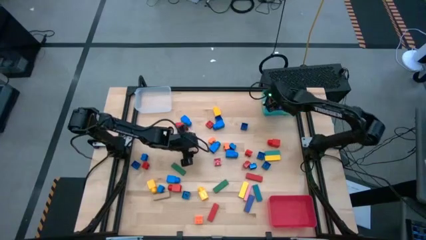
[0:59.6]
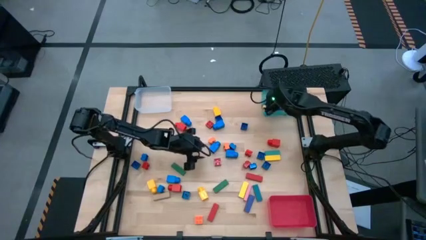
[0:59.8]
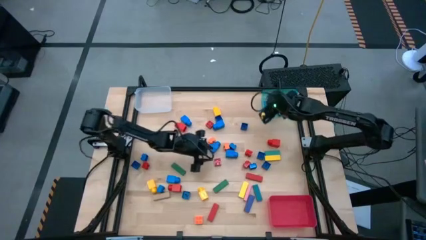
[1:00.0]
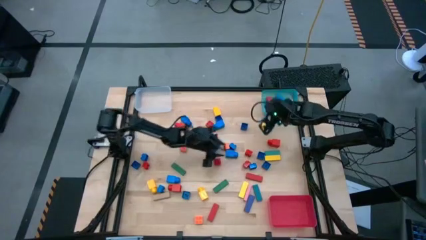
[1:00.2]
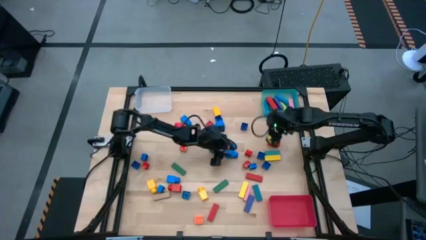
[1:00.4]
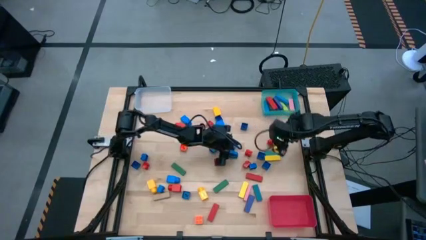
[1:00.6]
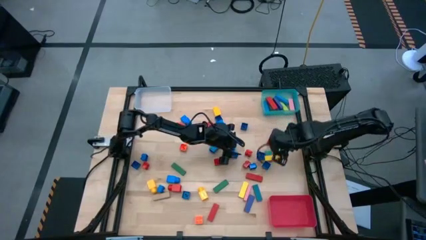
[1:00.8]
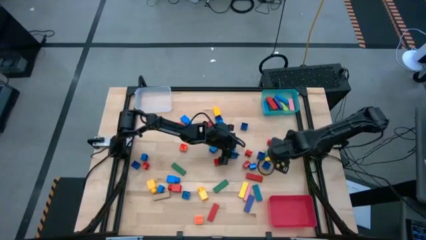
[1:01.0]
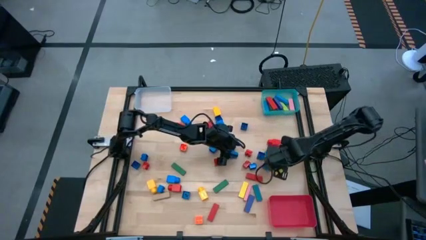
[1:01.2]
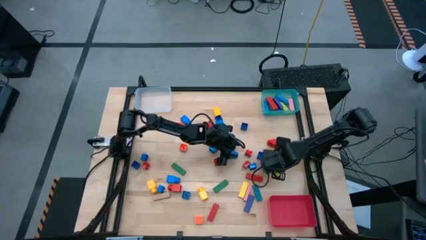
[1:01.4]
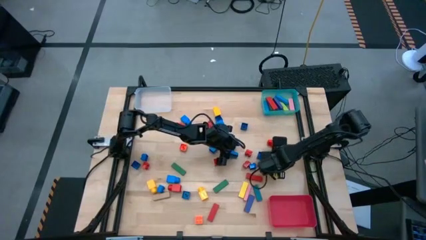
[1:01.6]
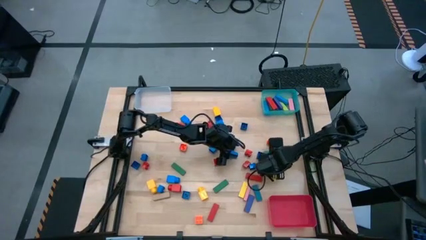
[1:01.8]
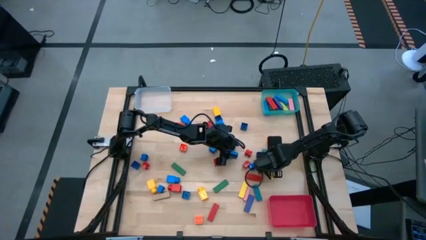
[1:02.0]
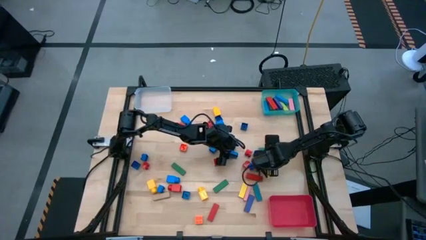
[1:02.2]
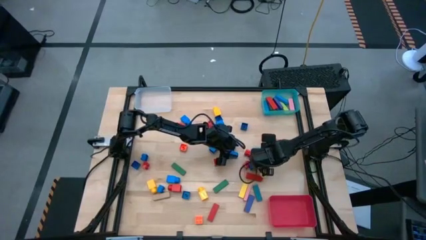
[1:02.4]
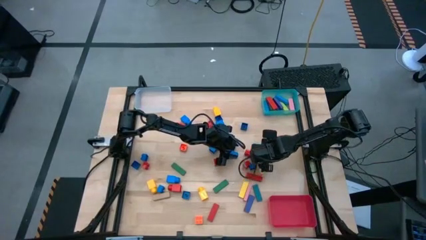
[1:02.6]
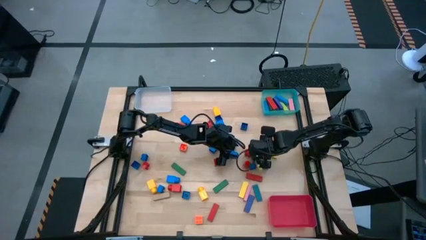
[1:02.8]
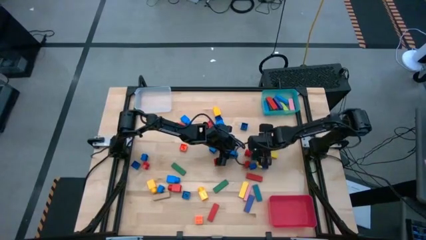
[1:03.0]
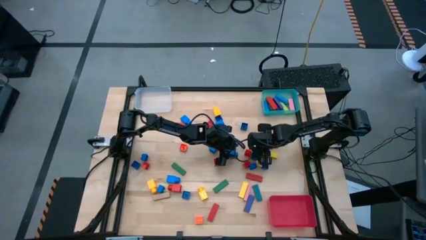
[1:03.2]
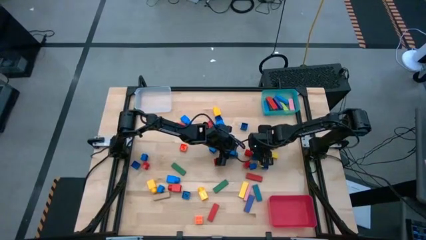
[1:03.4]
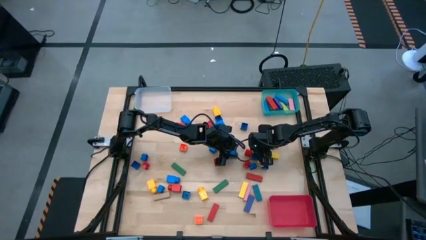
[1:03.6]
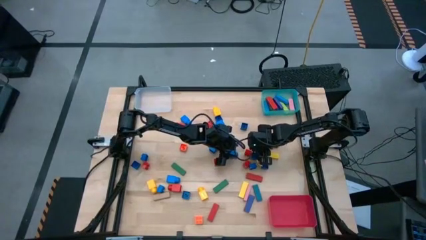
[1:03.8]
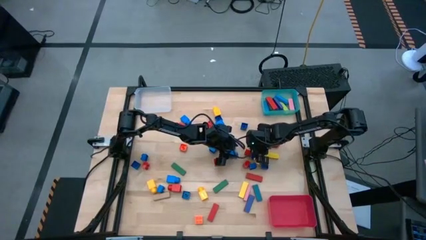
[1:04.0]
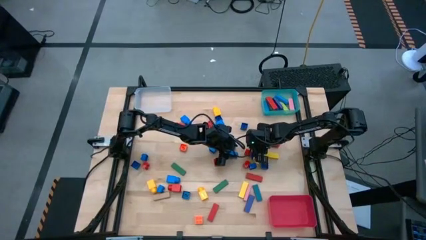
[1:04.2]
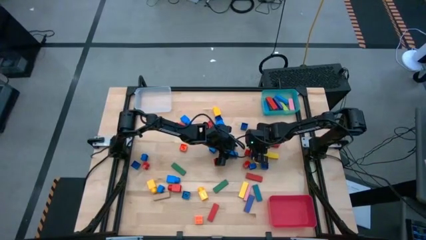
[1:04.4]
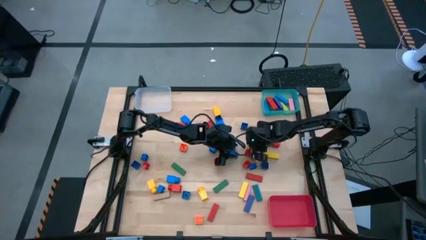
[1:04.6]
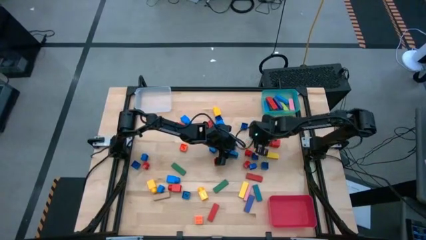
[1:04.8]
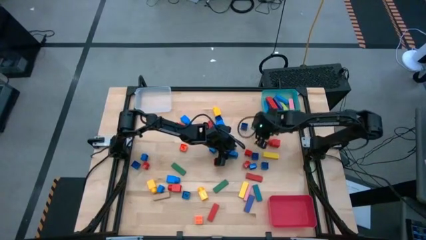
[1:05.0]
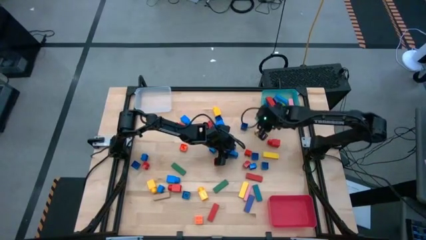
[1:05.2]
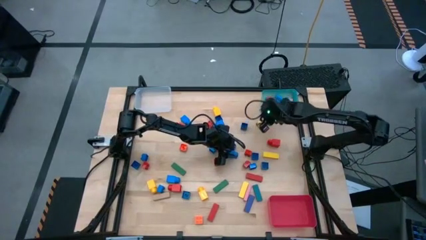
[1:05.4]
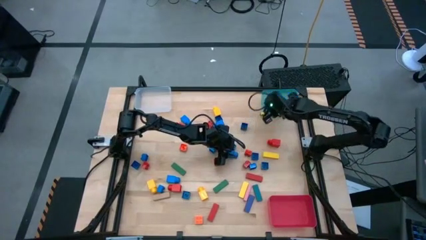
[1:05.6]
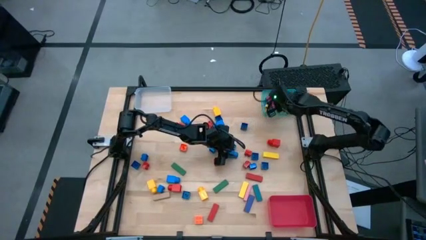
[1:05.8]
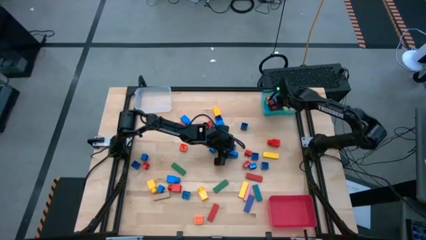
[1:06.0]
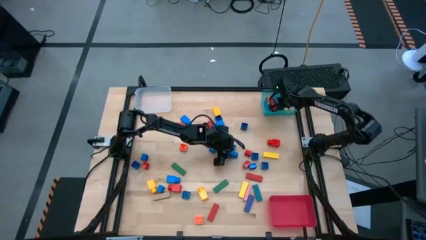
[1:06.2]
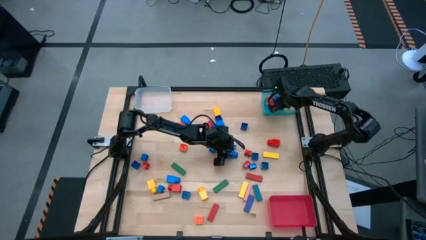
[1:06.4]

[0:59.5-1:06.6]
Task: Sort blocks by size
Put the light blue block into the blue bin

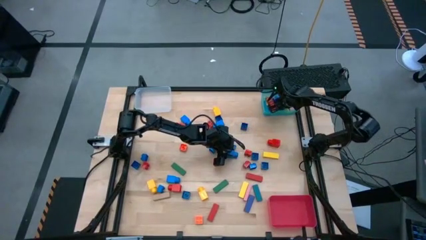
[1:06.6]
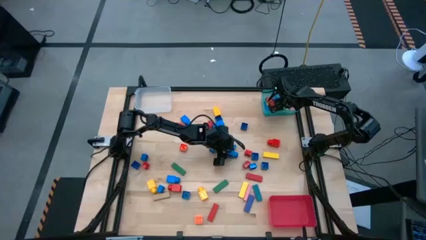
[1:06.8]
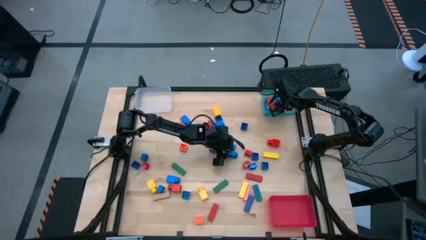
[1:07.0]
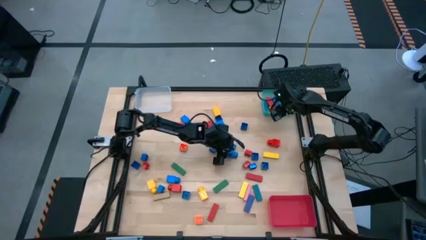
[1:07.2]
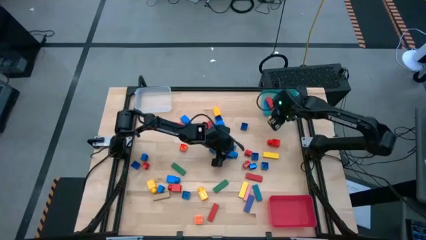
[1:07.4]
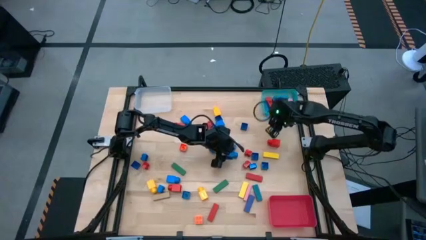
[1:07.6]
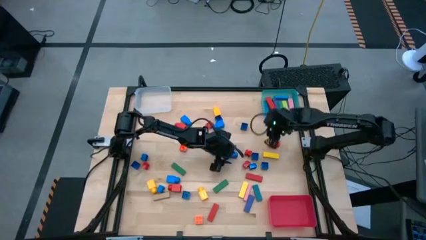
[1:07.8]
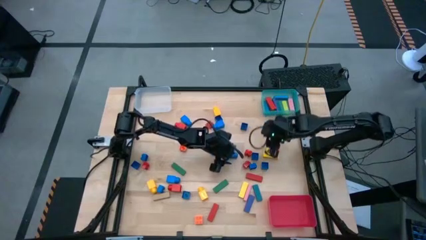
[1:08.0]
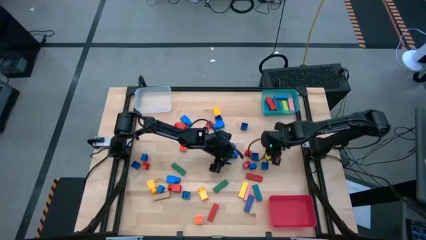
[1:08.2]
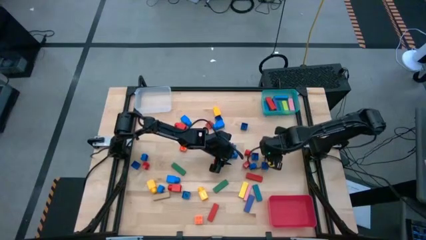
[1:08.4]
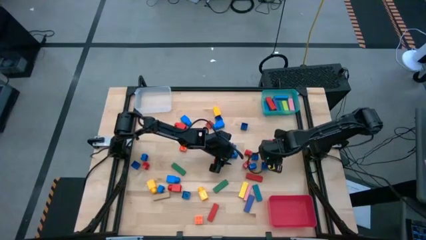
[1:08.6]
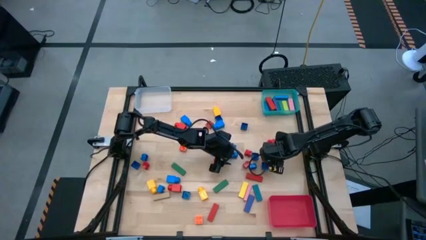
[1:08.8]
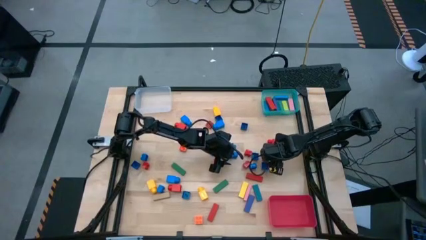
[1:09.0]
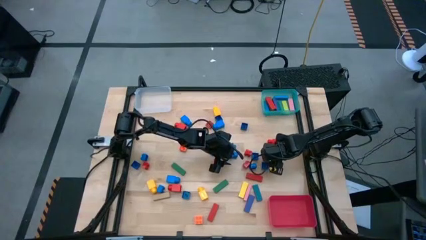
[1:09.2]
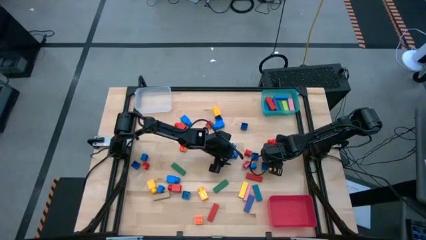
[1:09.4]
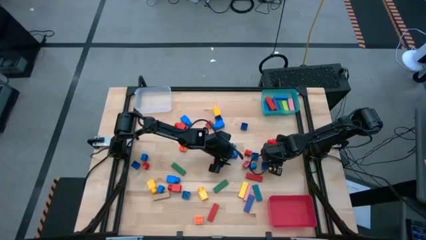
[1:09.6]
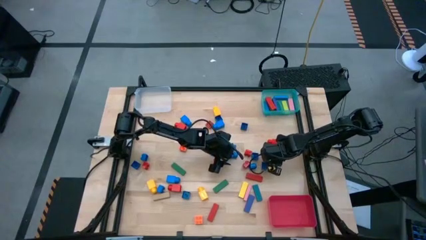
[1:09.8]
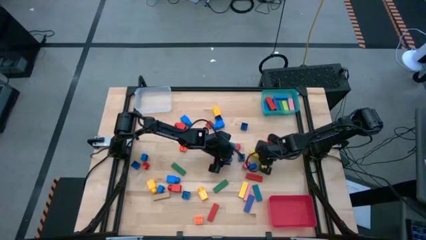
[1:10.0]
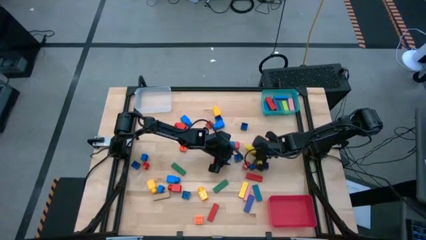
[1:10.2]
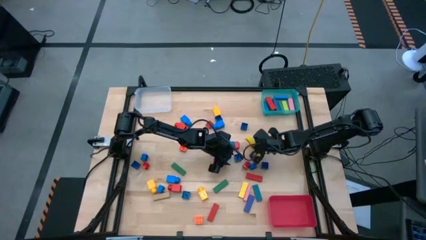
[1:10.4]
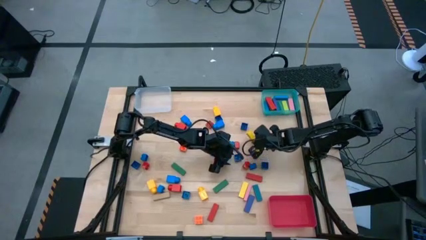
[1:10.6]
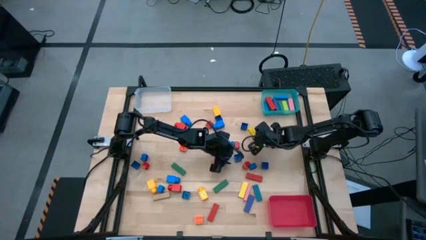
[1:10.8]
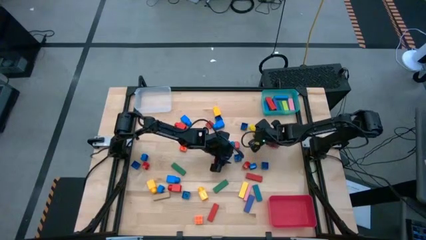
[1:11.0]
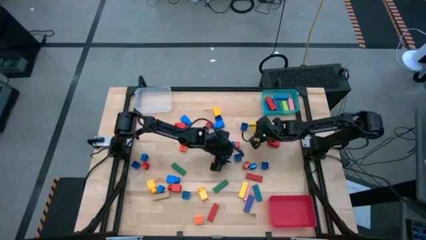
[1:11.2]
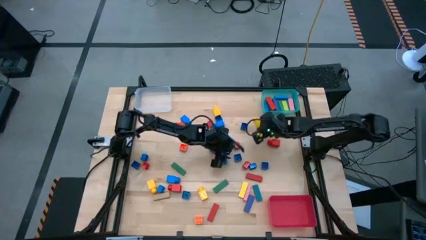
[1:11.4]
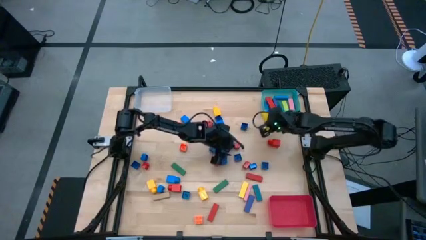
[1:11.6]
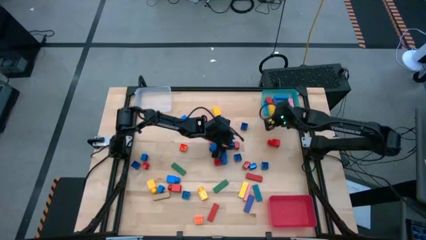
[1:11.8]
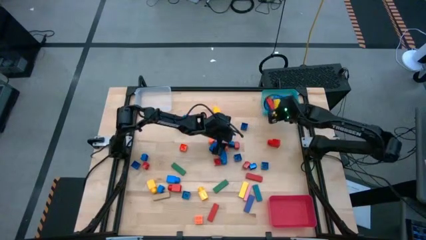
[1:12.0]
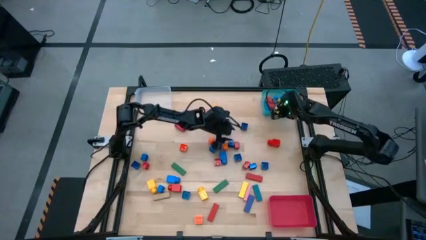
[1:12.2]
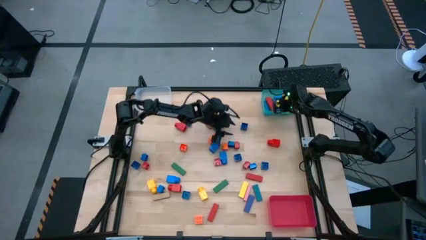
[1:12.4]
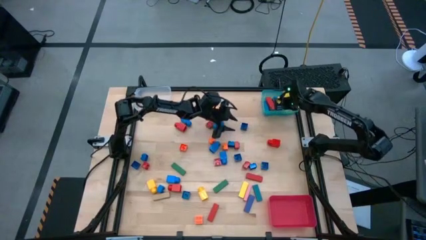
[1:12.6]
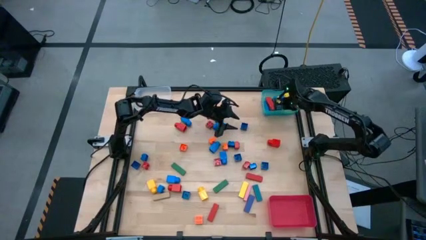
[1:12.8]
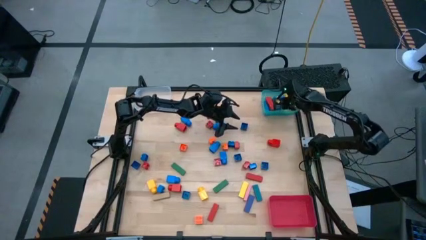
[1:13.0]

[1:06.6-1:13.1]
Put the yellow block into the blue bin

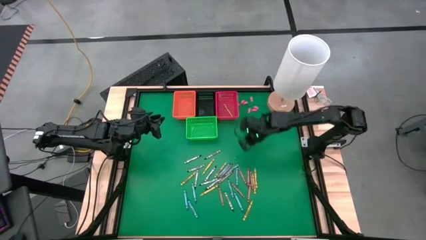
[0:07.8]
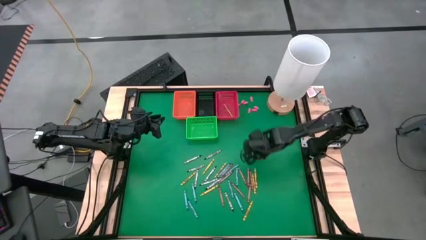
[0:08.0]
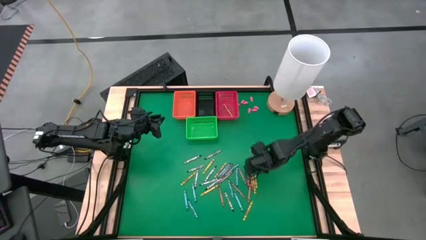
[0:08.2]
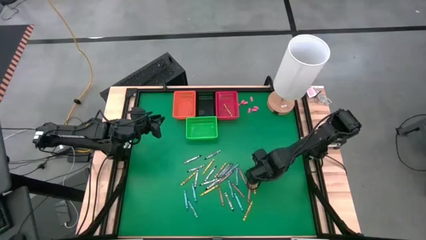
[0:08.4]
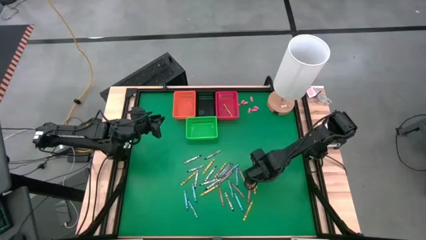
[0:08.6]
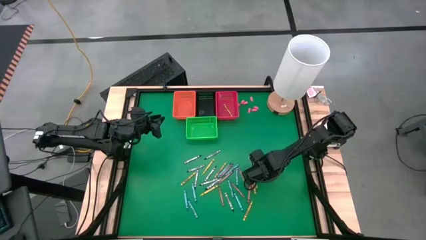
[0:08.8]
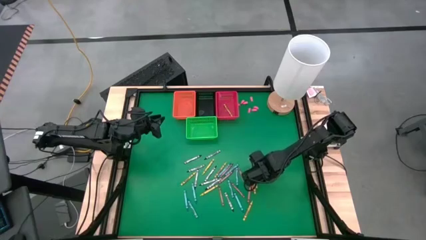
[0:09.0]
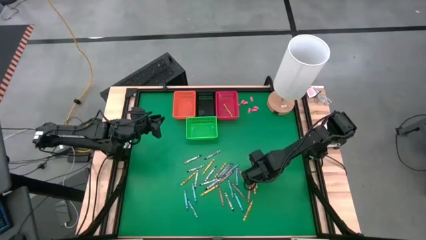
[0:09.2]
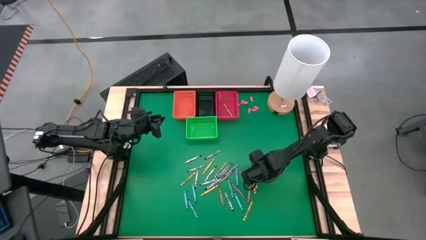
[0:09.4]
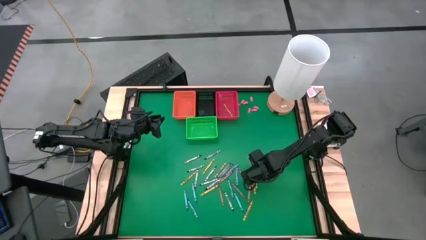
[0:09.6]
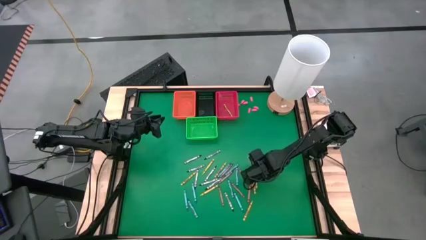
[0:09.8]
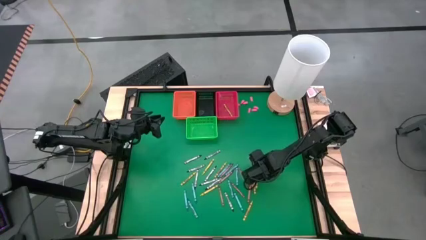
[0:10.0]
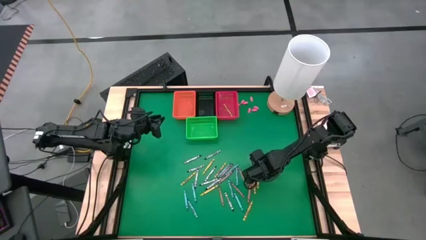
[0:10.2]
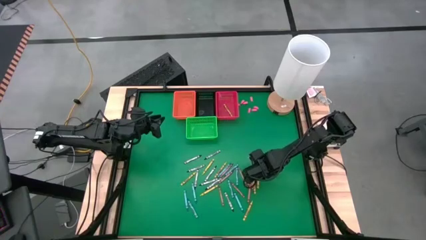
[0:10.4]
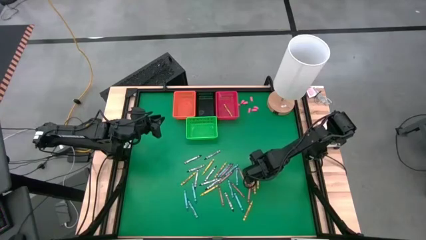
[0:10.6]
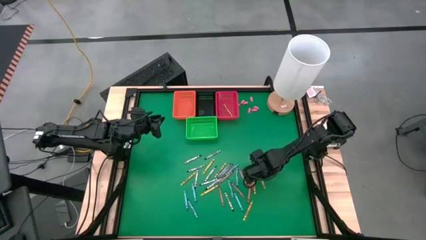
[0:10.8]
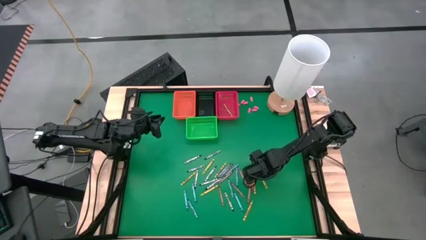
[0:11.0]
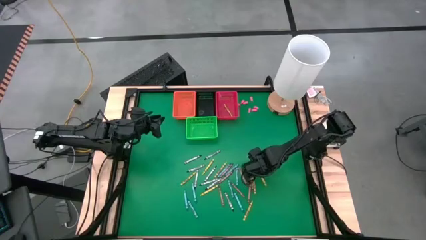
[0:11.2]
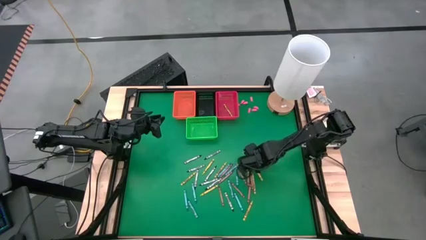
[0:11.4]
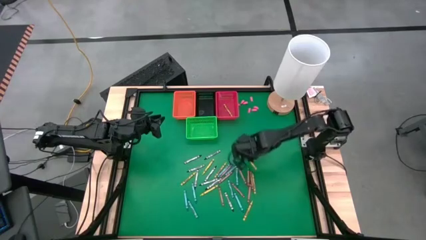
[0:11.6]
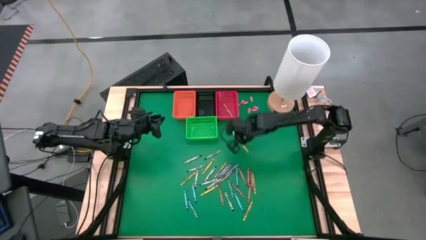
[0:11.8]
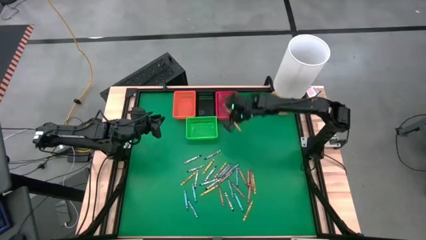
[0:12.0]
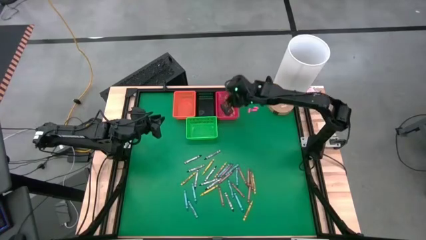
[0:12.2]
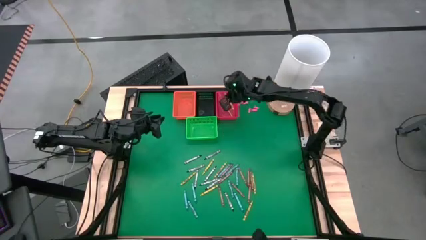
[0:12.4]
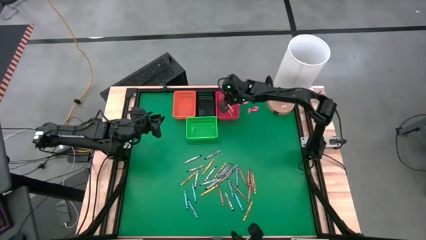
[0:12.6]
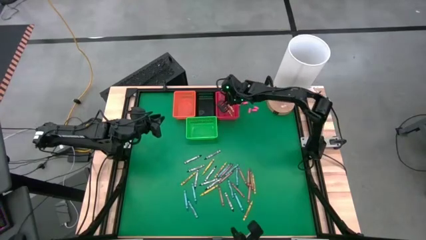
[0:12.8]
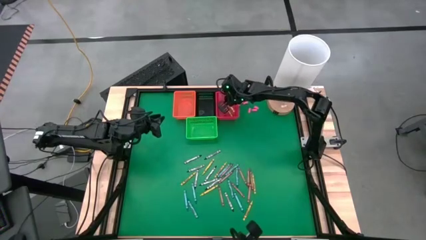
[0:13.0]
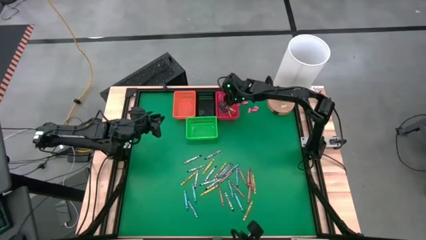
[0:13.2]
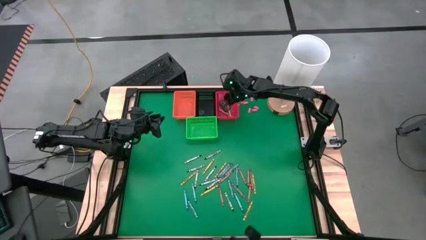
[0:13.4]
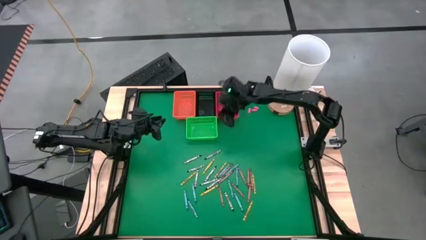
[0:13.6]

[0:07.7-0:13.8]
Task: Sort crayons
Put a yellow crayon in the red basket
